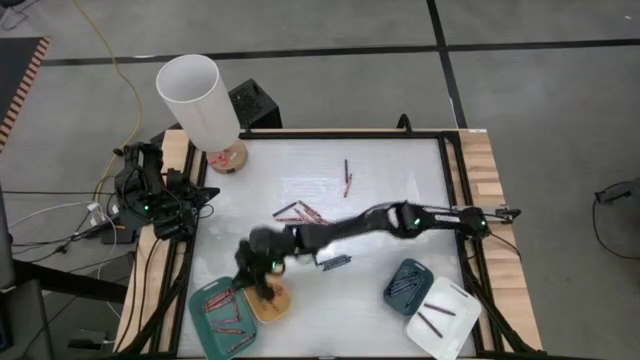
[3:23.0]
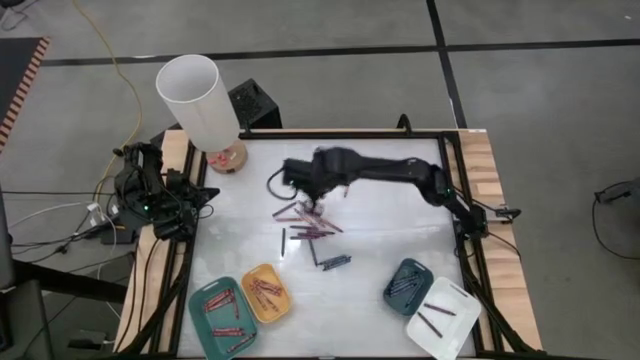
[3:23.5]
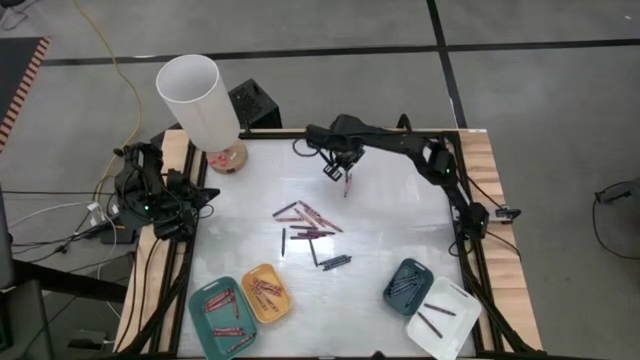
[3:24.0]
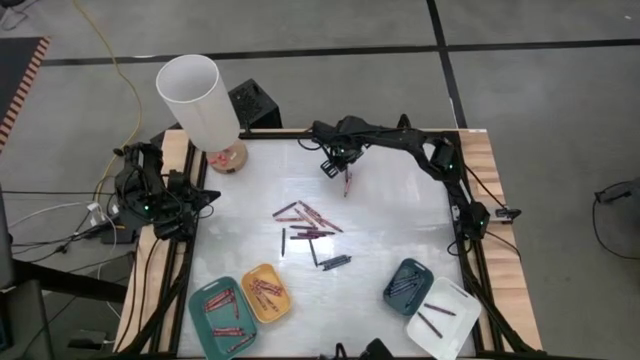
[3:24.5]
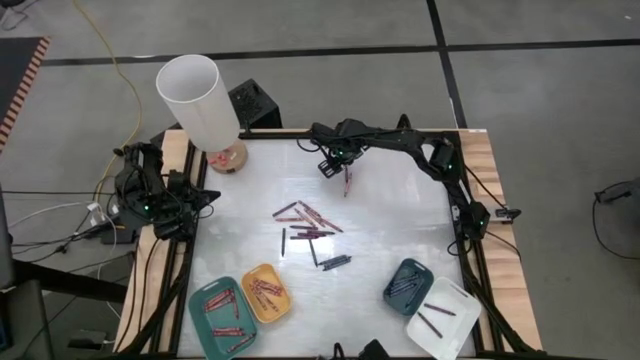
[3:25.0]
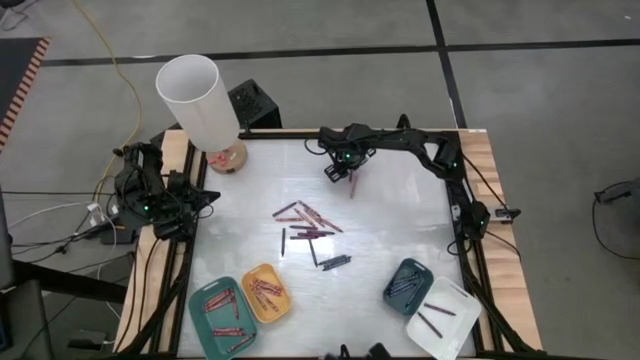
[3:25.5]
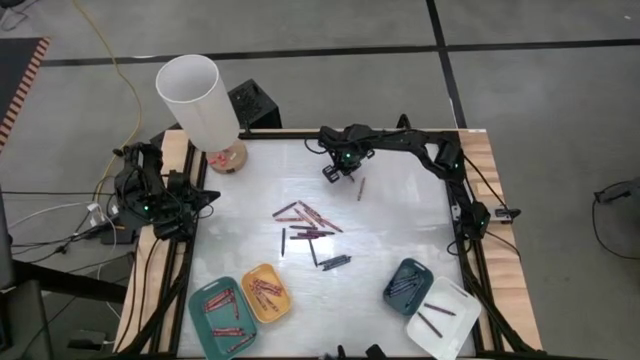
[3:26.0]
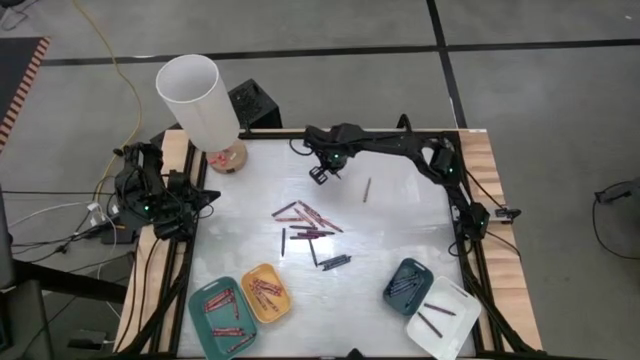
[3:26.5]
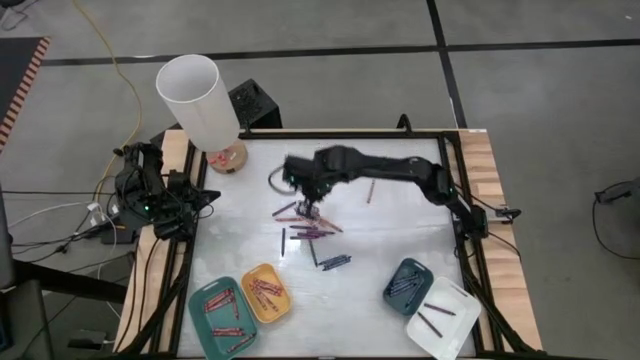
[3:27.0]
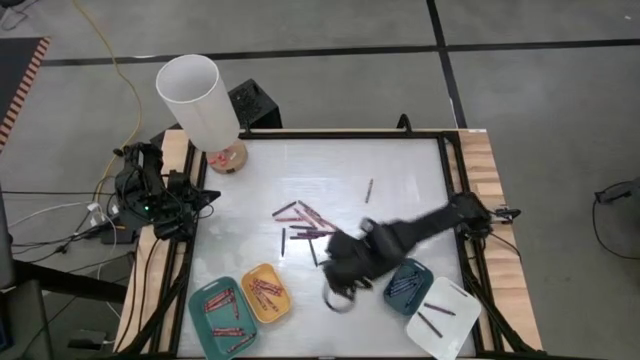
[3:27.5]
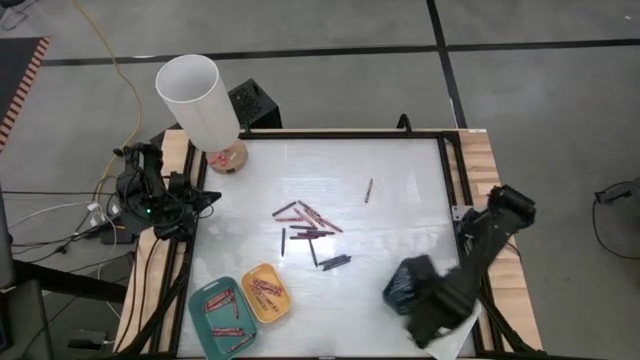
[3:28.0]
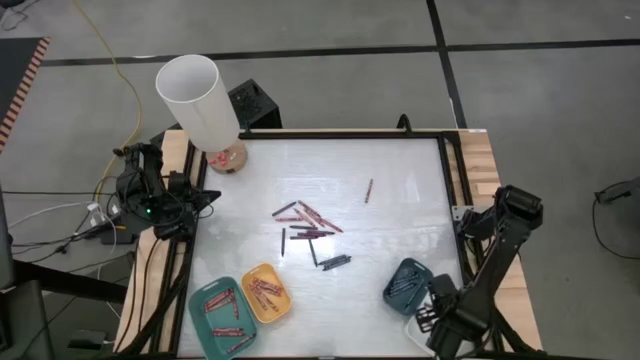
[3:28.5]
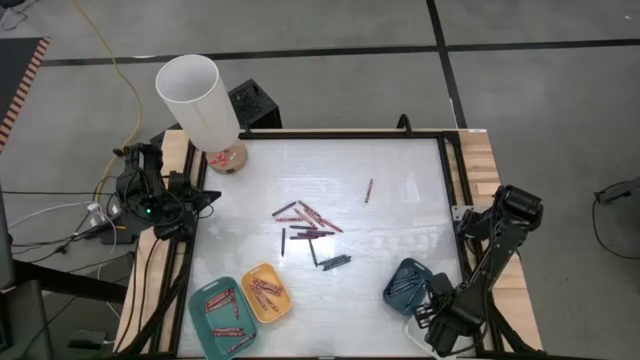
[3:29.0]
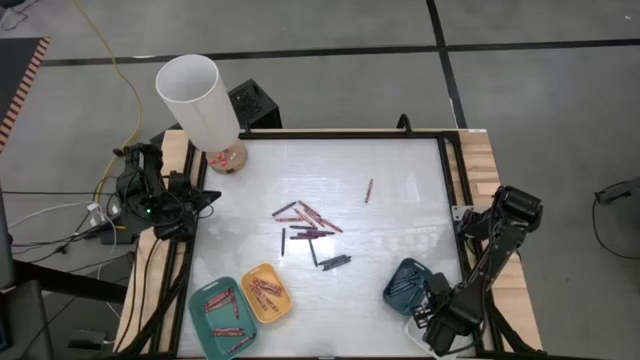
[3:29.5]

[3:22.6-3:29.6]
Task: Sort crayons
Put the purple crayon into the white bin

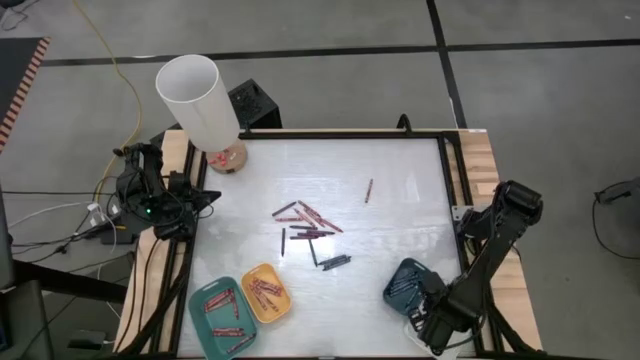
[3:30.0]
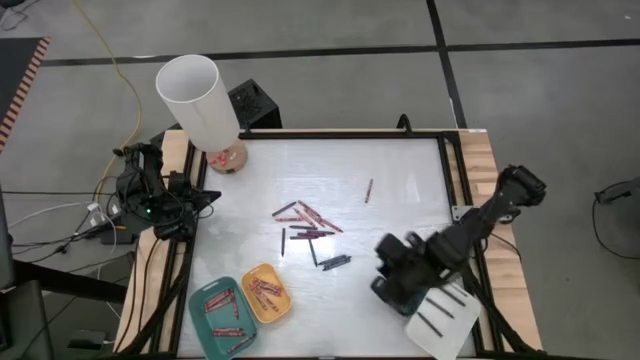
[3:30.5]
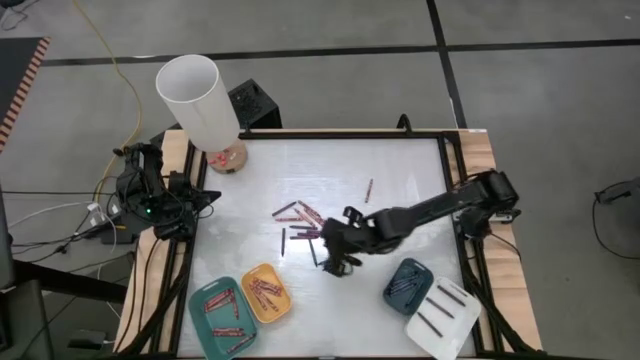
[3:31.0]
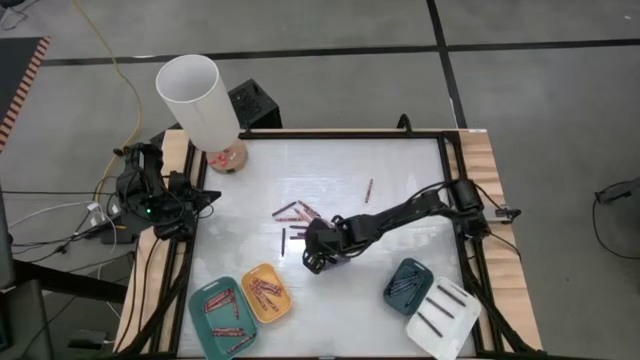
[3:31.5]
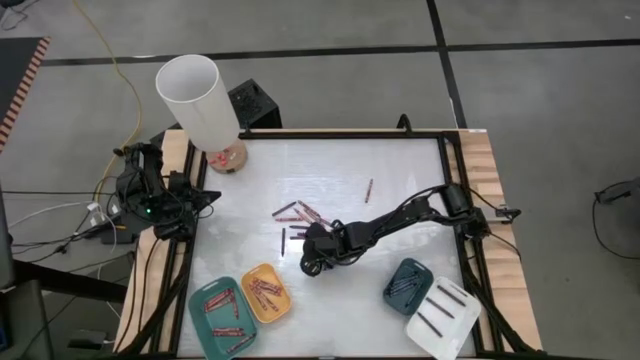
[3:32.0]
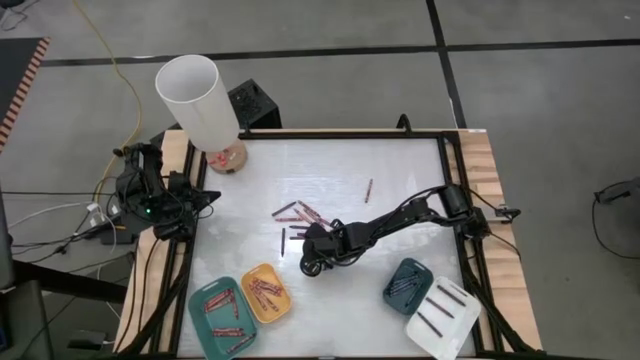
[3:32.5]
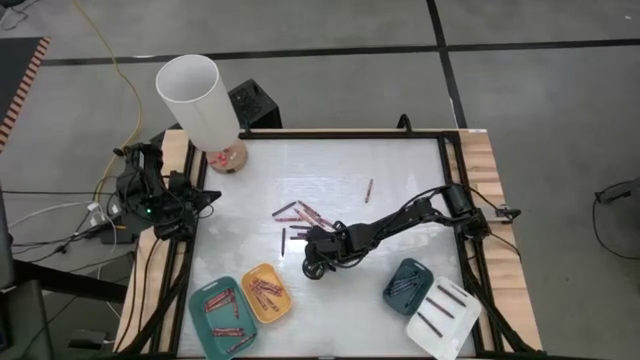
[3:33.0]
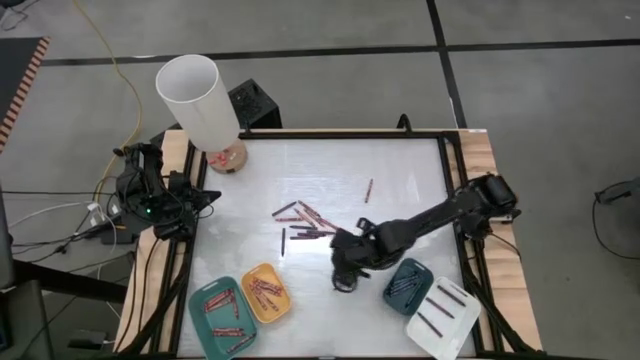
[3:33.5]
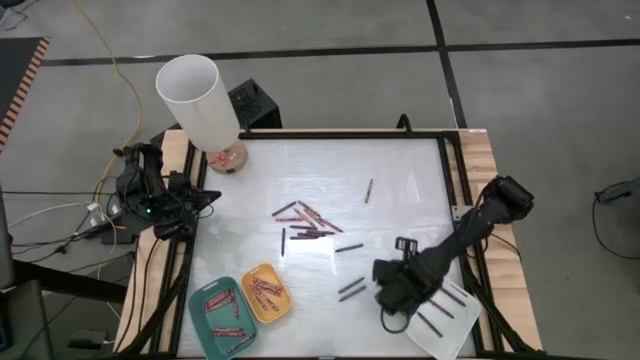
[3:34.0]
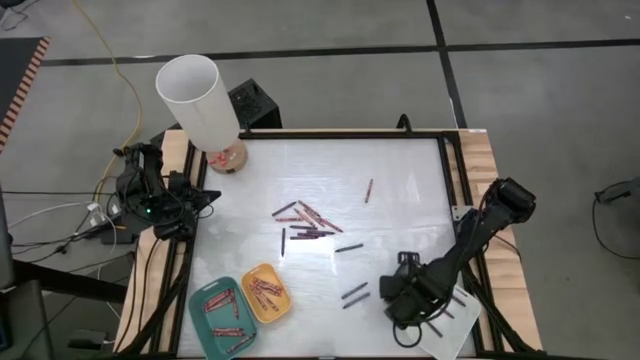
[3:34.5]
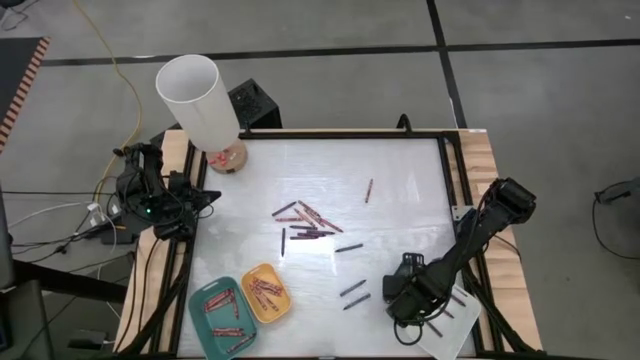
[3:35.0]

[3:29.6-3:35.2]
Put the blue crayon into the dark blue bin

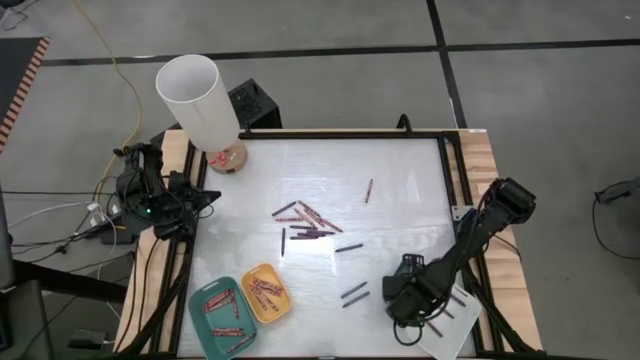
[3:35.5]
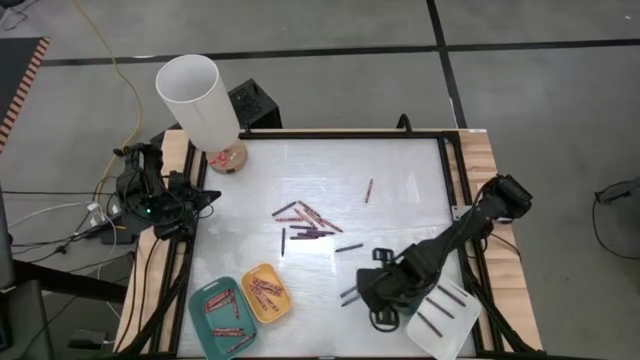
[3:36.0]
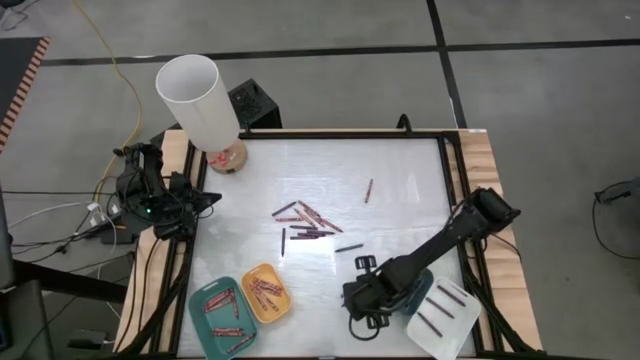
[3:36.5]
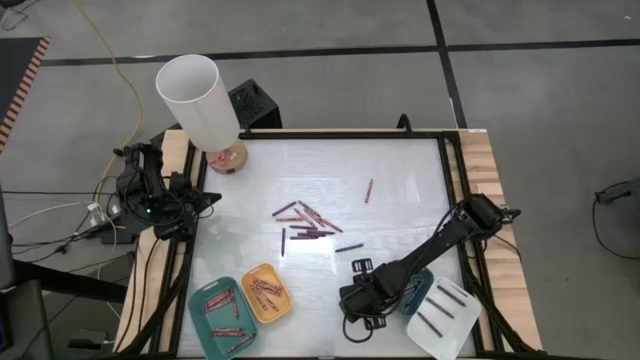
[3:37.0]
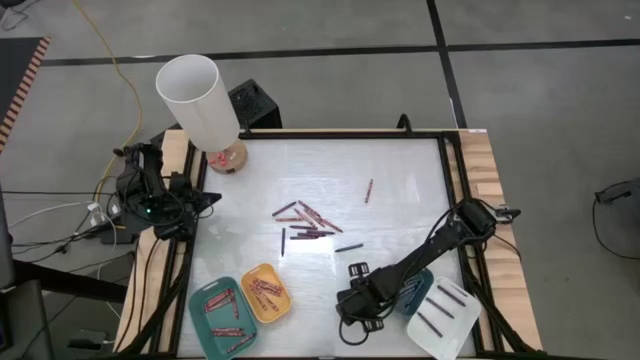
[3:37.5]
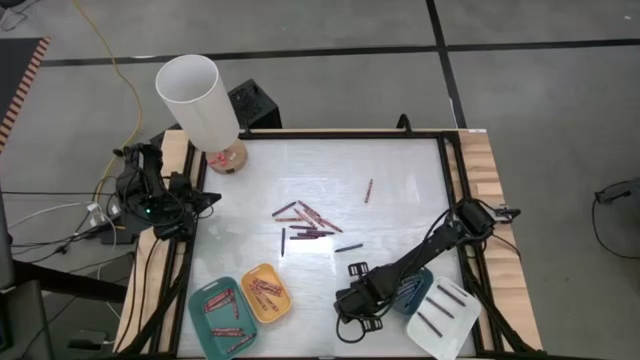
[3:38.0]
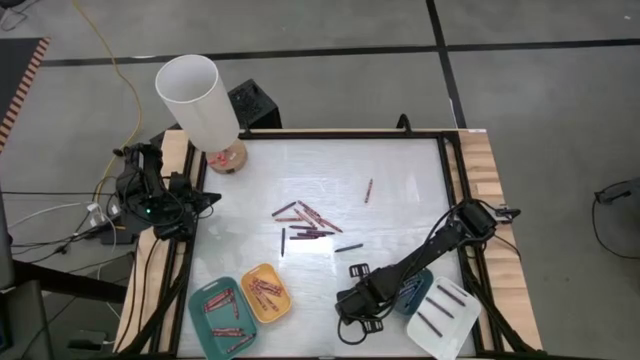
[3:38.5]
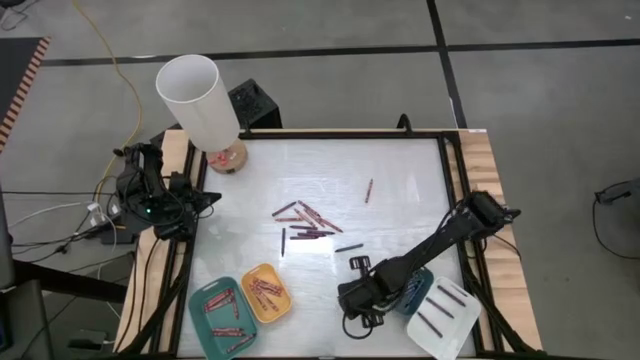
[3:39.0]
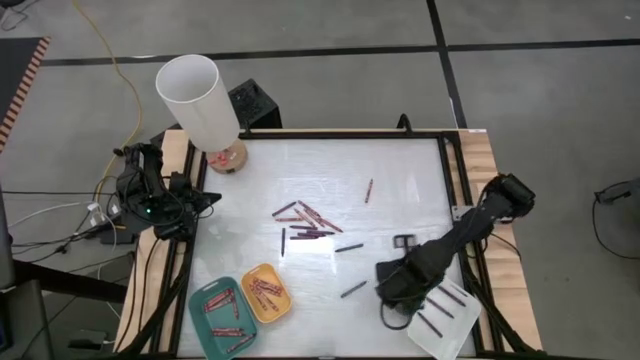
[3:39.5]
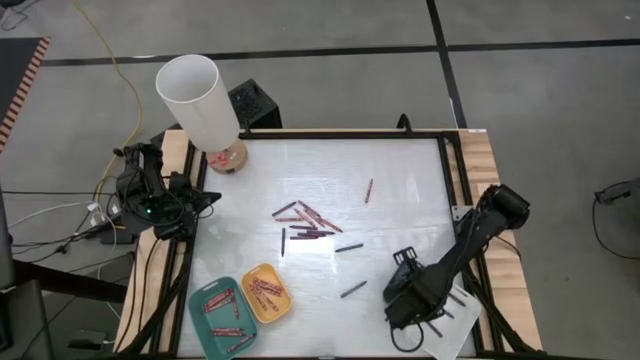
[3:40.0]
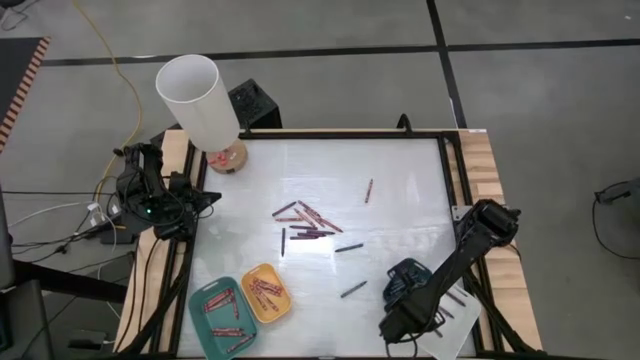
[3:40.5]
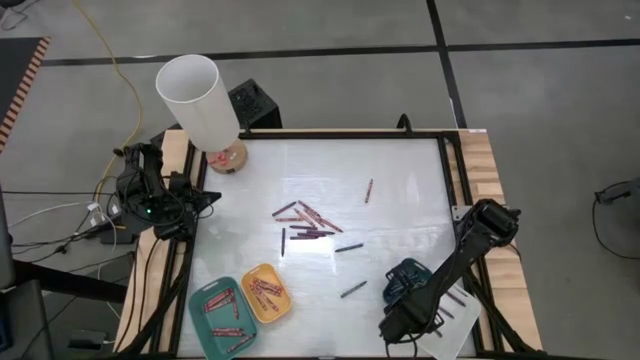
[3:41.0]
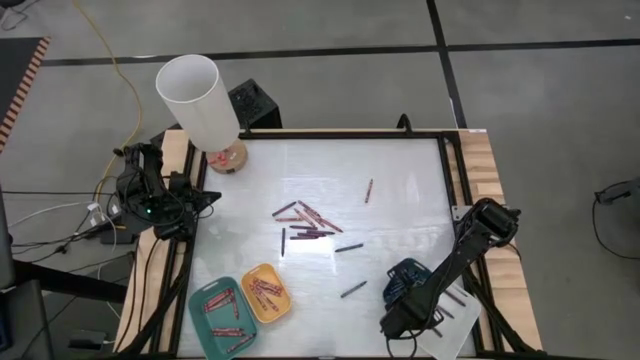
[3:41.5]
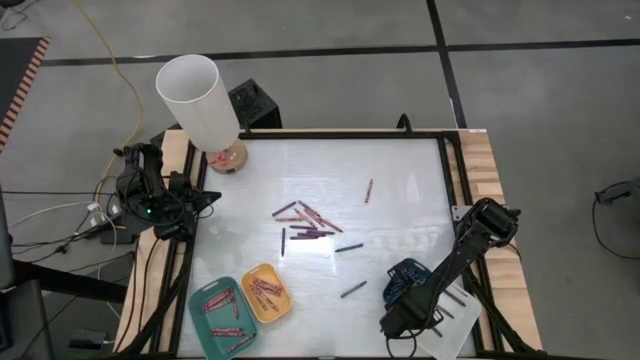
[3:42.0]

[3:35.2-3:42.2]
Put the blue crayon into the dark blue bin
